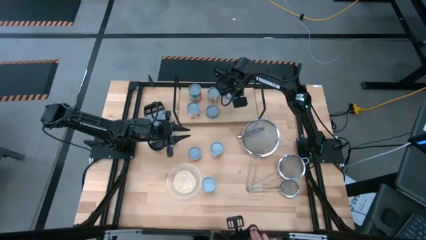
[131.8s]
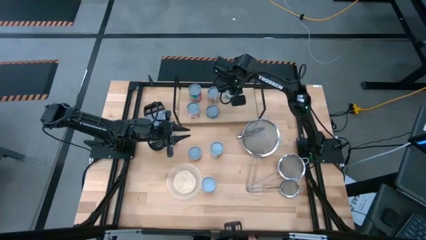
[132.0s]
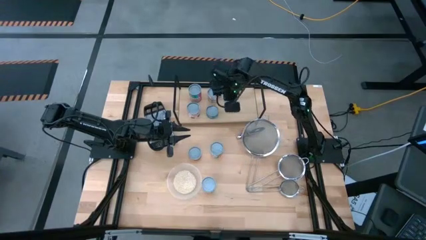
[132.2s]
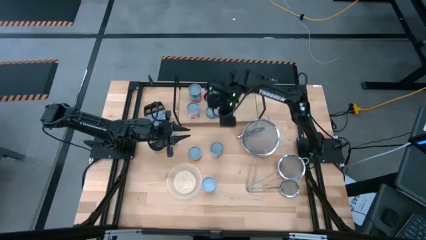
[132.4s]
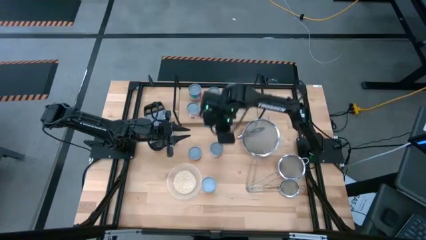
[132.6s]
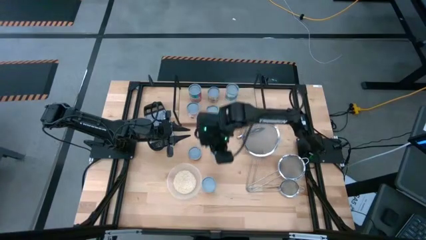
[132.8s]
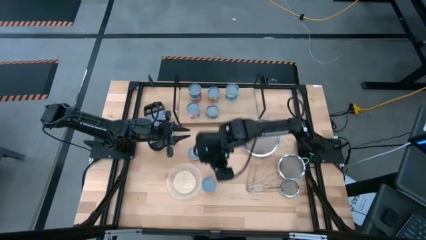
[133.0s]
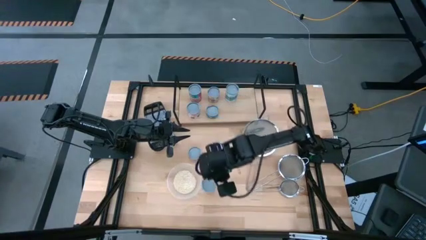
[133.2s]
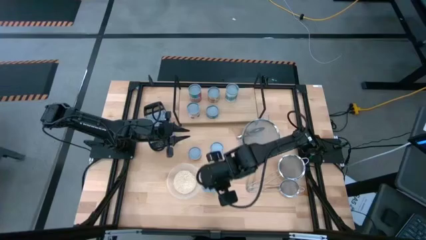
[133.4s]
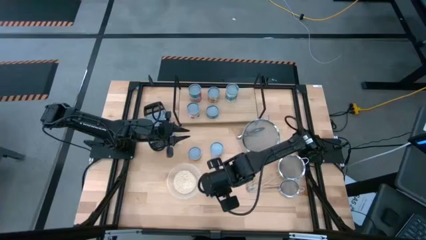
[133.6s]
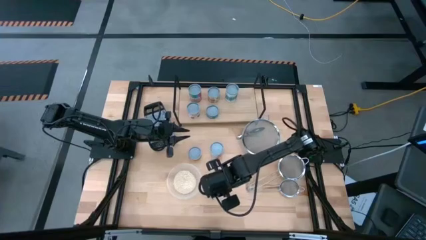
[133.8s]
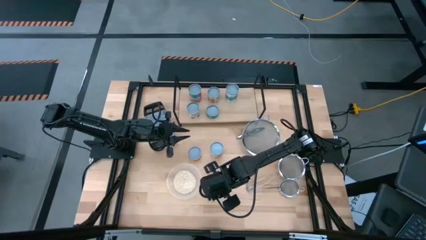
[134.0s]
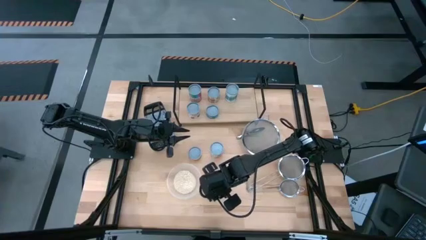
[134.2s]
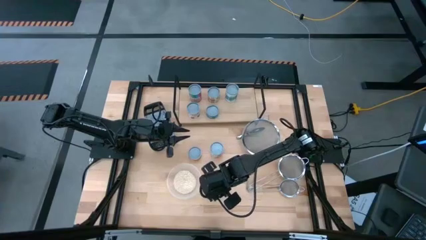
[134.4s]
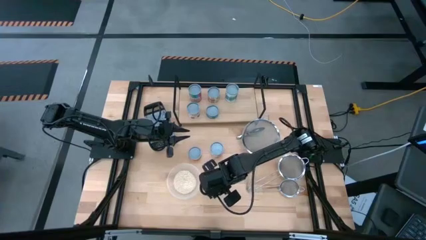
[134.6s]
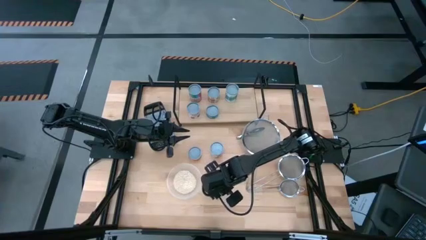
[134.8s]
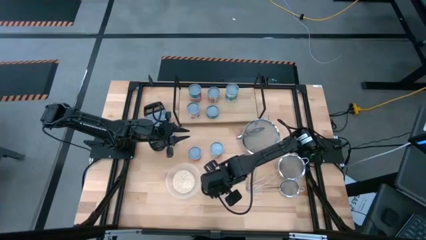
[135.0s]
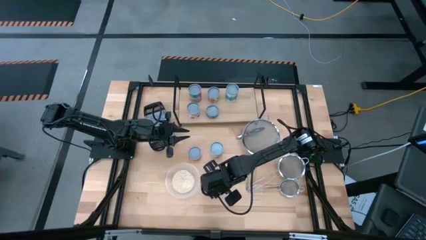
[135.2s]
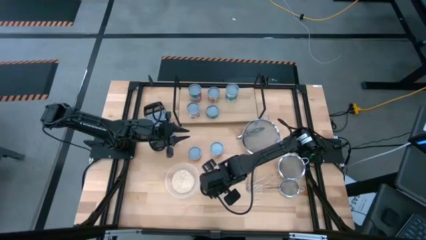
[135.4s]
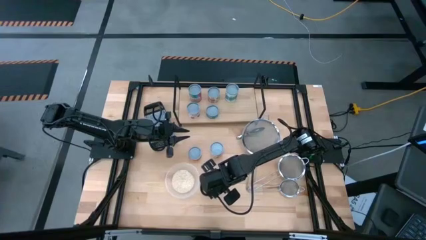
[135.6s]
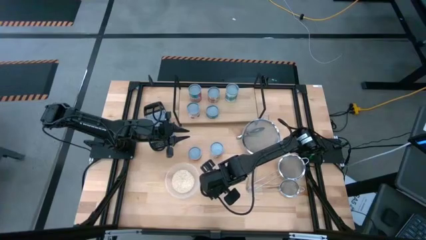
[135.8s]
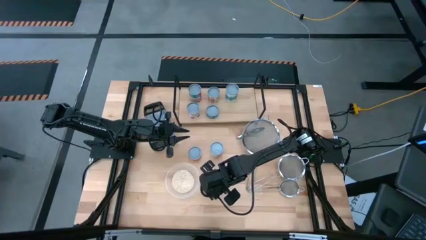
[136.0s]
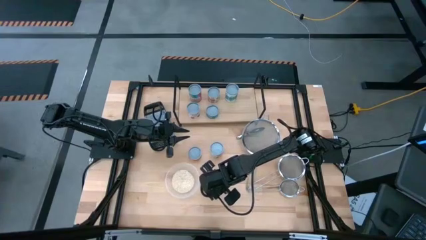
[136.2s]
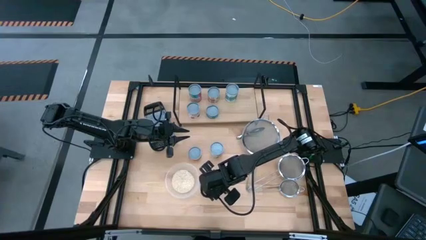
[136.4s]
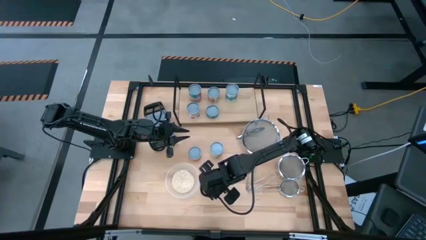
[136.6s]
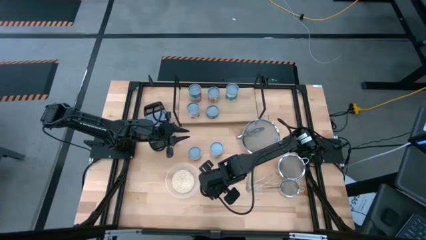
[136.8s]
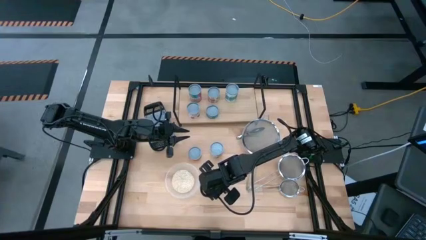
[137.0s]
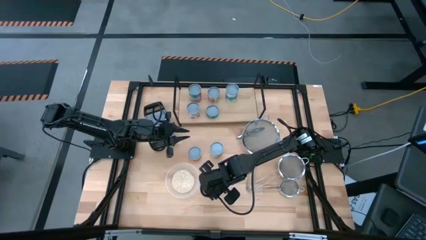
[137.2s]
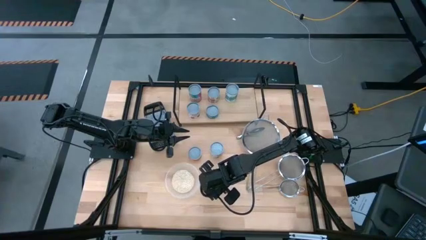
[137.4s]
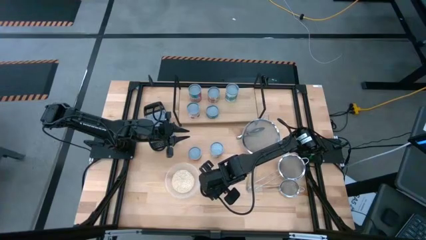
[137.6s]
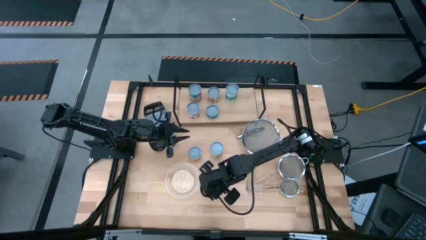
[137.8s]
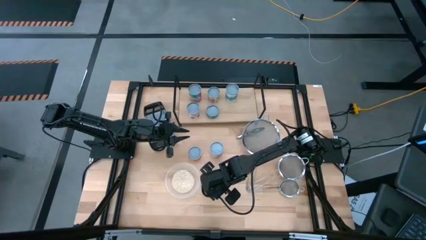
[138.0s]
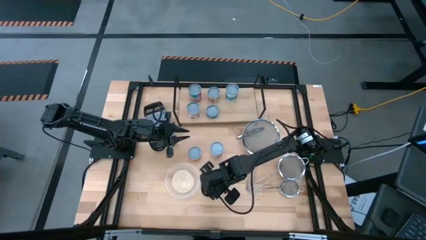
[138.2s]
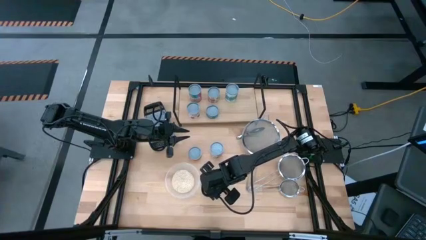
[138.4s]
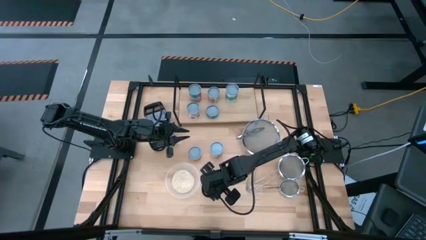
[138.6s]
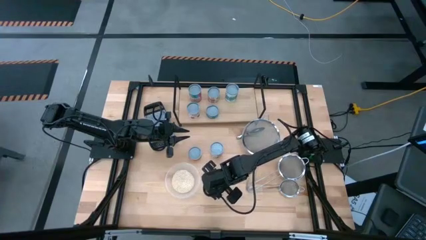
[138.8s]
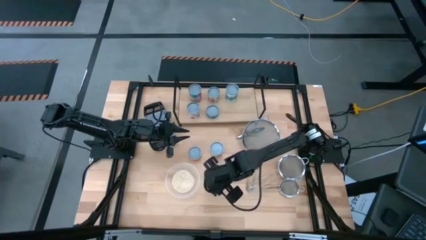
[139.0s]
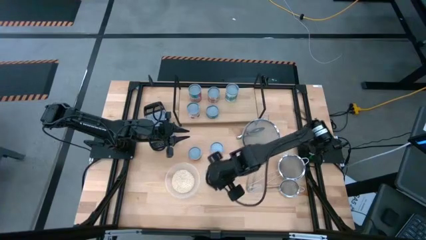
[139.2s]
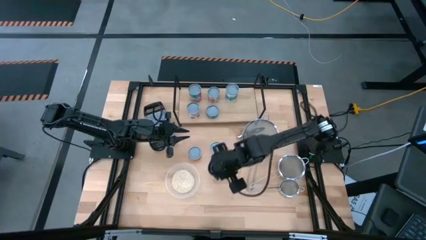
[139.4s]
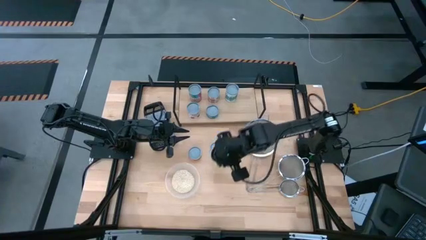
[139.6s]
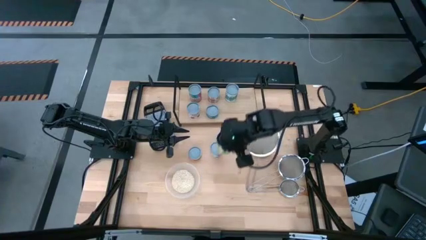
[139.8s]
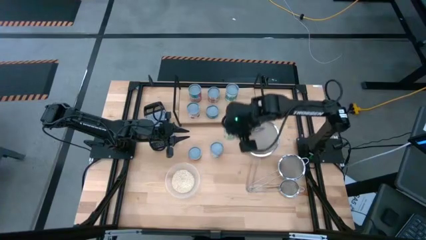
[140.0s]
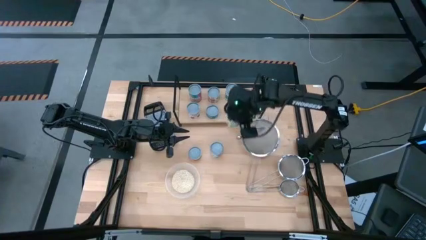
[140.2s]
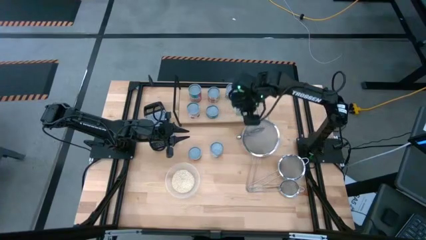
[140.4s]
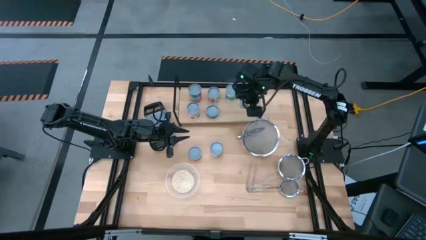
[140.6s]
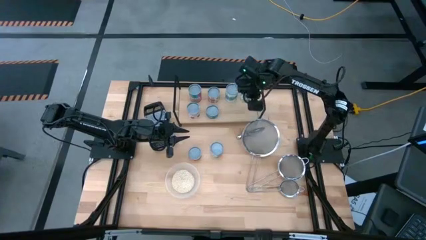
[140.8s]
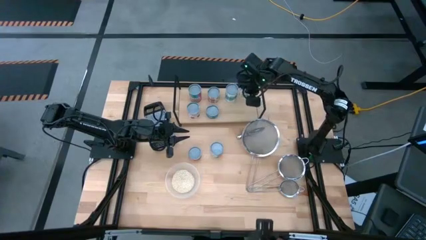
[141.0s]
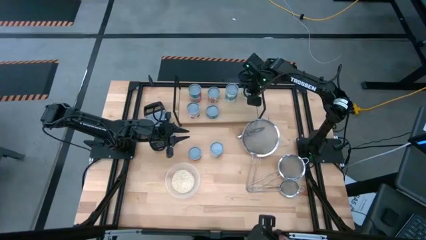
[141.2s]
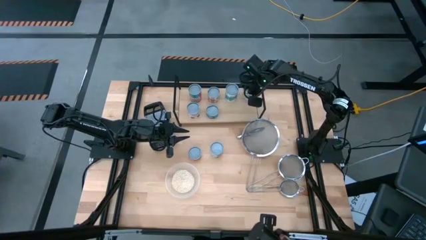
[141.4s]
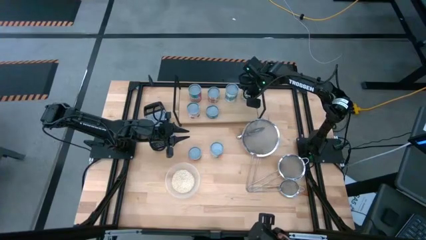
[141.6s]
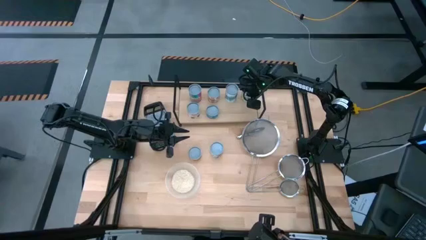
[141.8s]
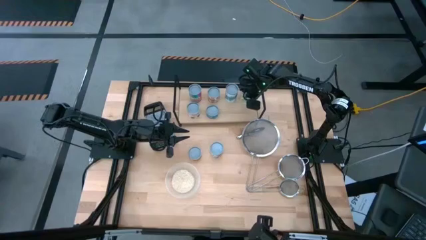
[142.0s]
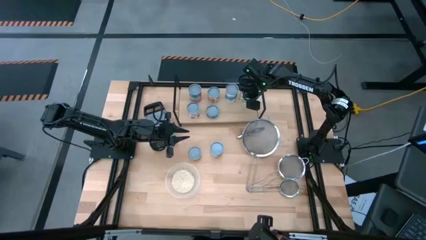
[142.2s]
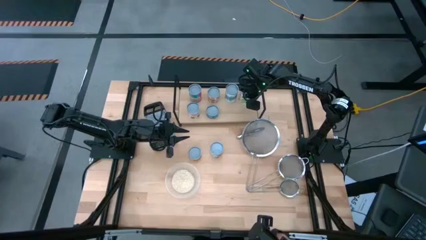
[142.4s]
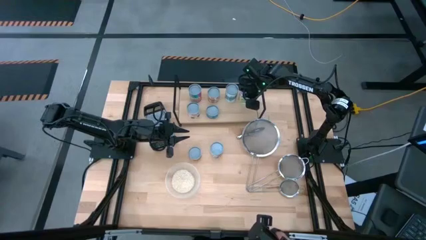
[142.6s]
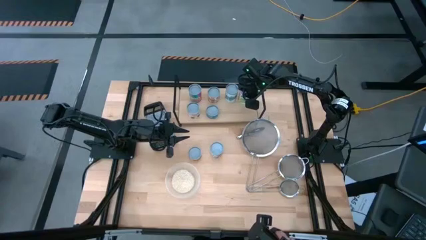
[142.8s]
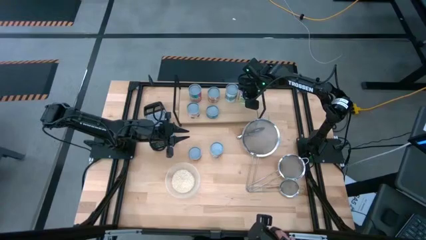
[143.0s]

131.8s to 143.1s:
Task: Pick and place cans onto a shelf
Put the white mixed fruits can on the shelf
